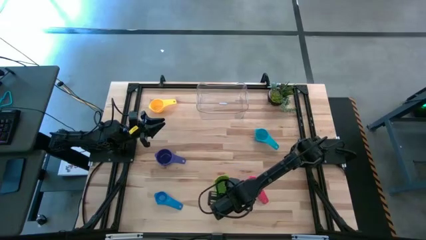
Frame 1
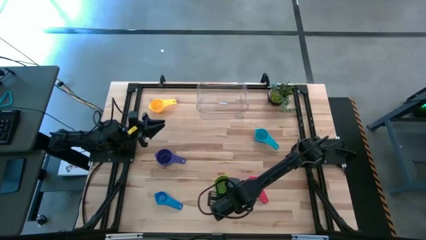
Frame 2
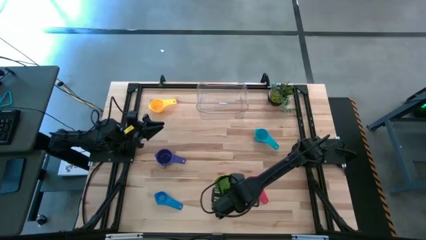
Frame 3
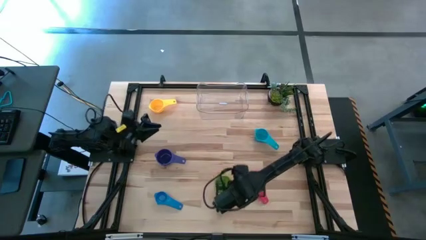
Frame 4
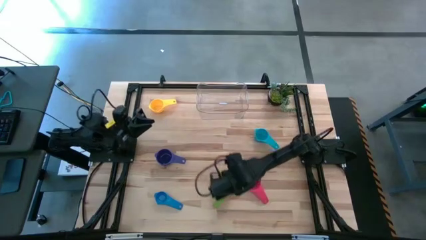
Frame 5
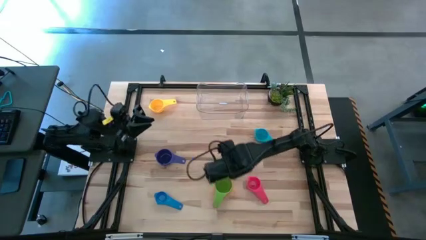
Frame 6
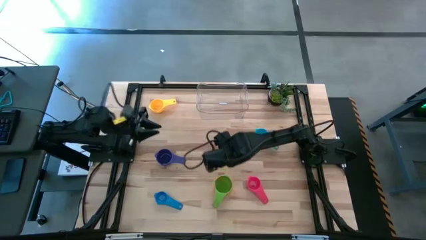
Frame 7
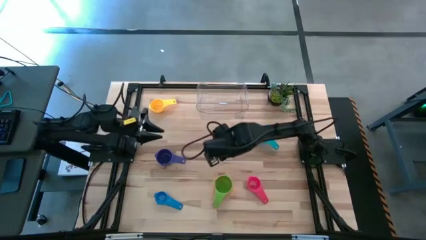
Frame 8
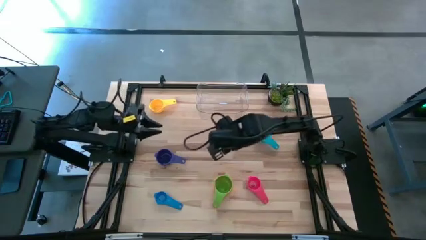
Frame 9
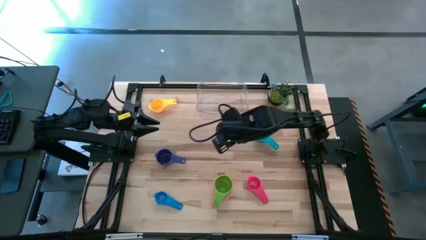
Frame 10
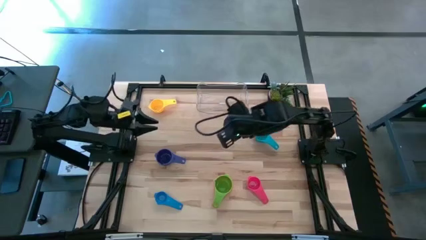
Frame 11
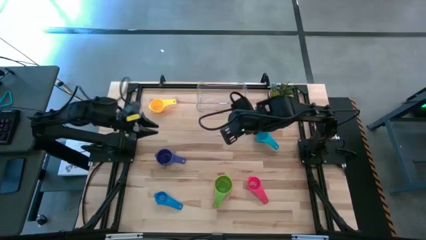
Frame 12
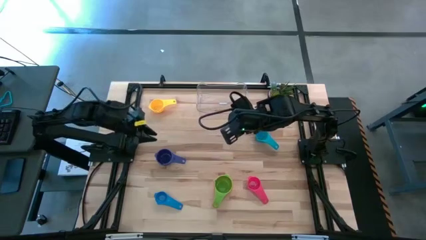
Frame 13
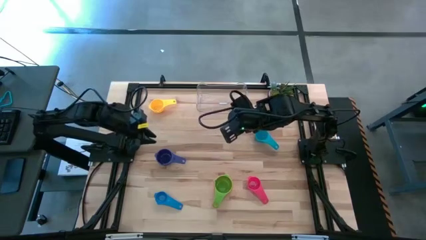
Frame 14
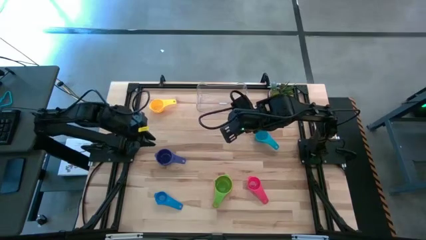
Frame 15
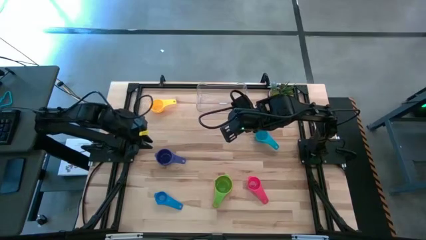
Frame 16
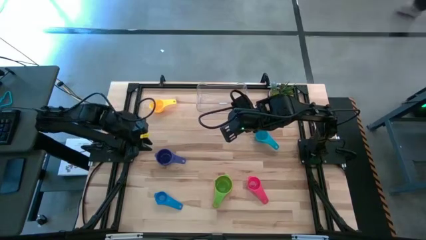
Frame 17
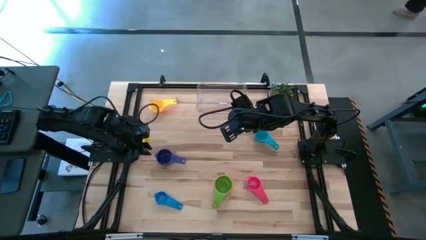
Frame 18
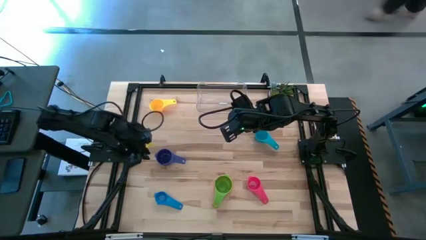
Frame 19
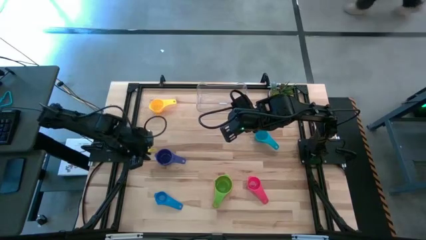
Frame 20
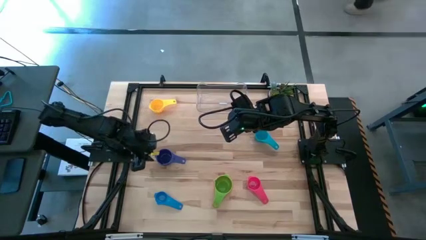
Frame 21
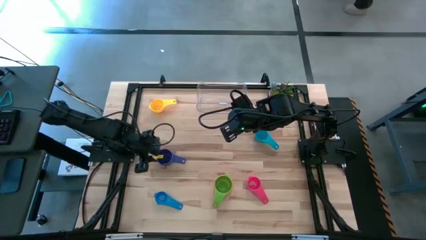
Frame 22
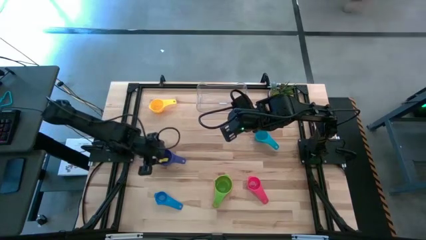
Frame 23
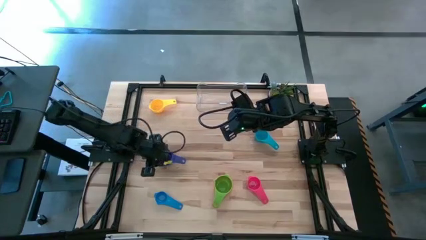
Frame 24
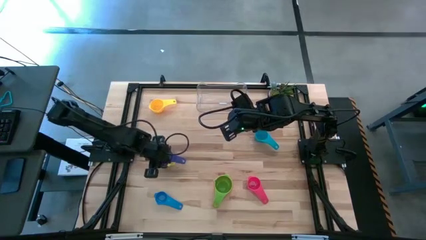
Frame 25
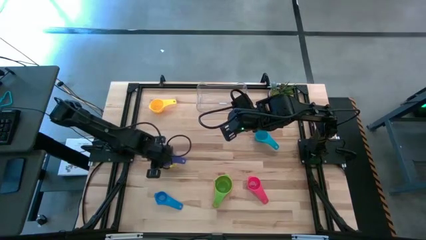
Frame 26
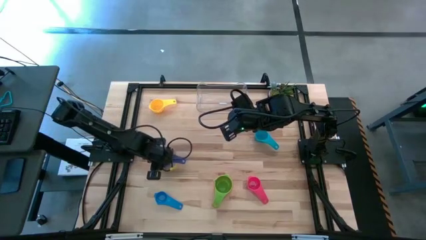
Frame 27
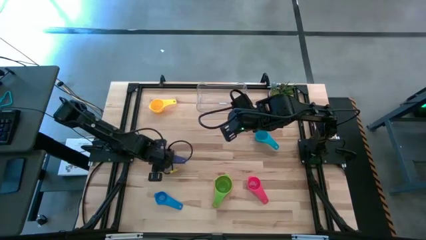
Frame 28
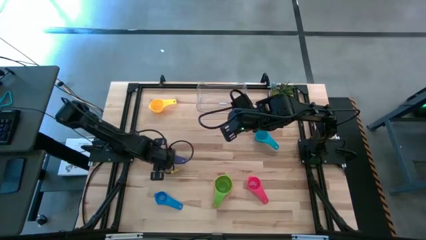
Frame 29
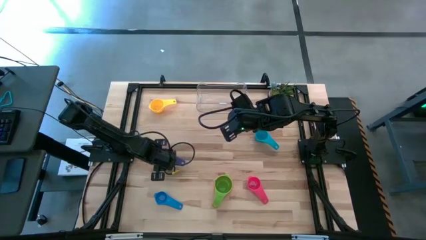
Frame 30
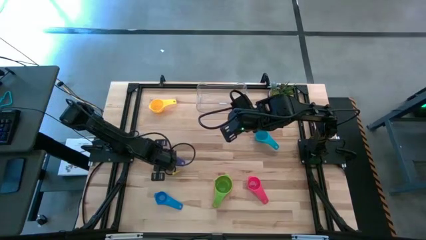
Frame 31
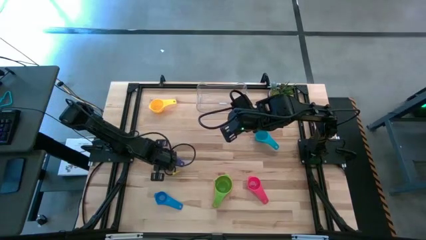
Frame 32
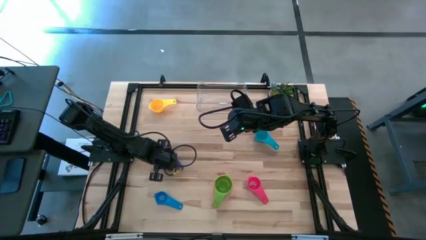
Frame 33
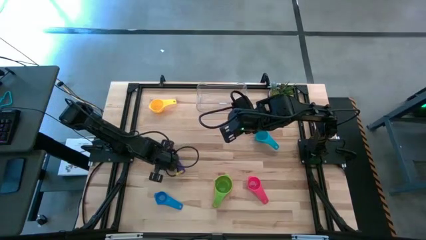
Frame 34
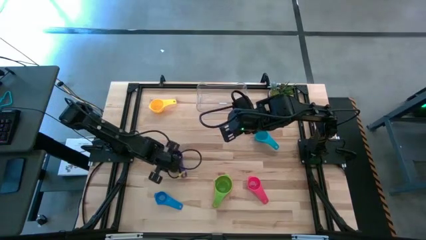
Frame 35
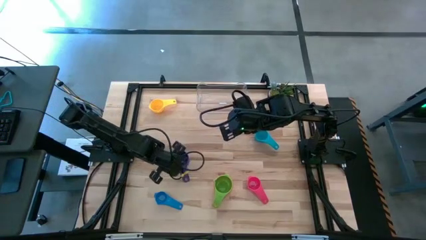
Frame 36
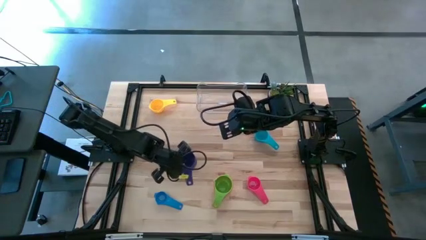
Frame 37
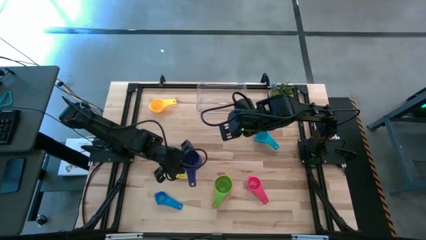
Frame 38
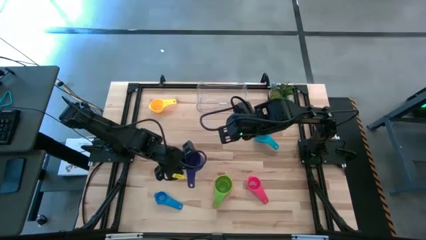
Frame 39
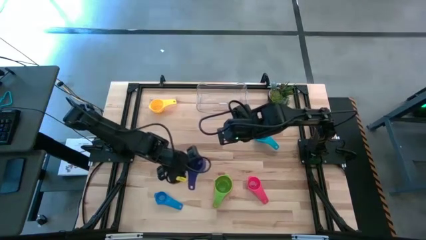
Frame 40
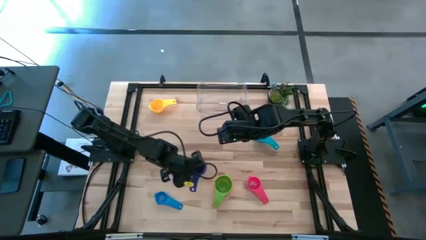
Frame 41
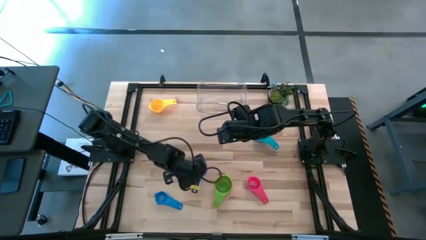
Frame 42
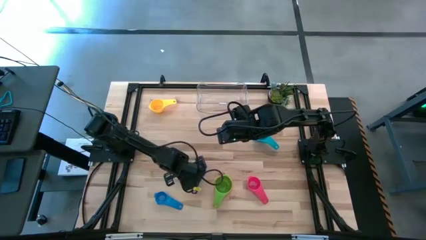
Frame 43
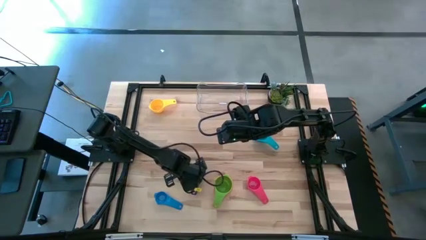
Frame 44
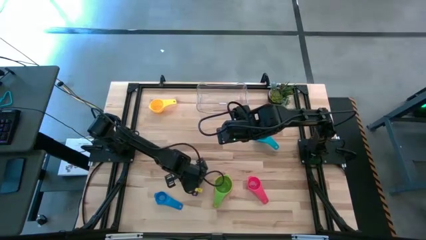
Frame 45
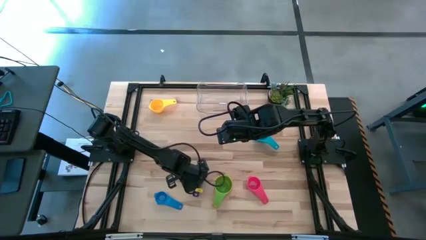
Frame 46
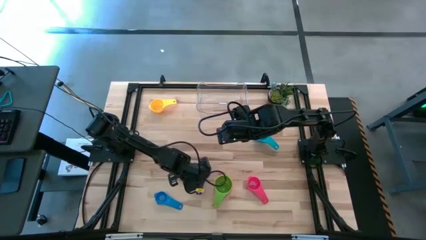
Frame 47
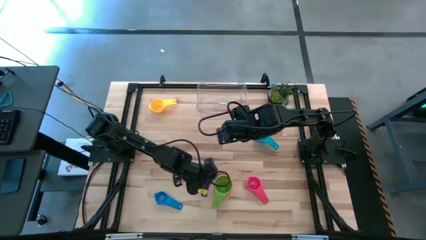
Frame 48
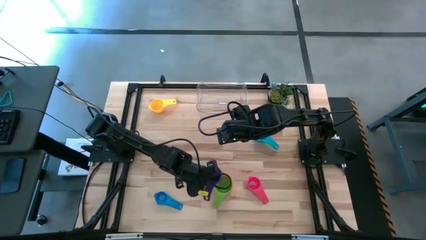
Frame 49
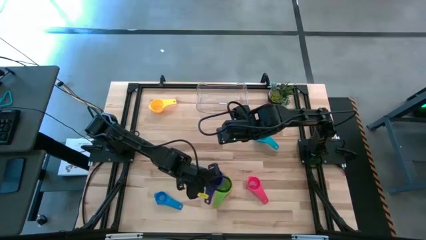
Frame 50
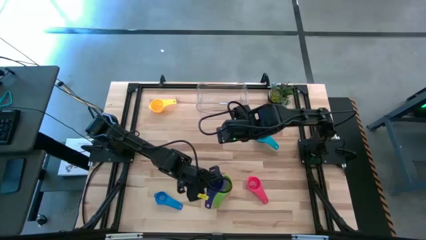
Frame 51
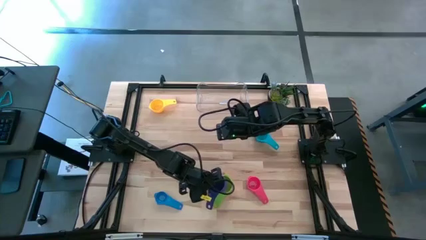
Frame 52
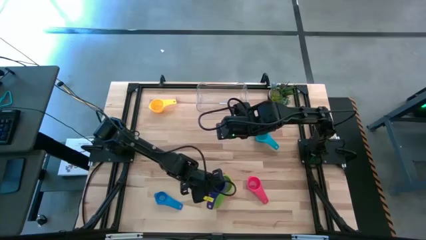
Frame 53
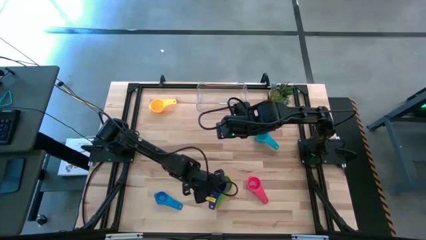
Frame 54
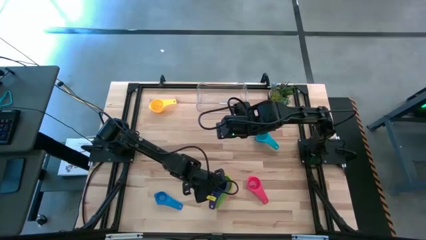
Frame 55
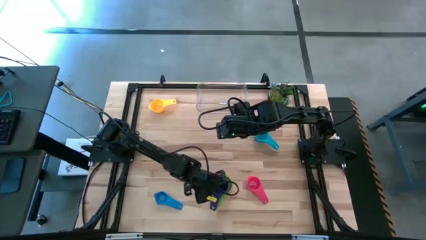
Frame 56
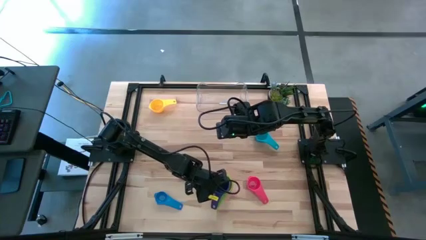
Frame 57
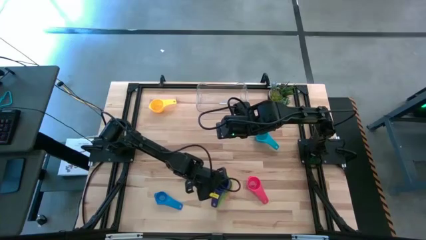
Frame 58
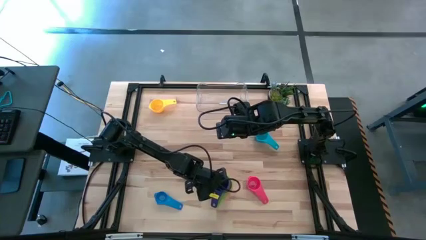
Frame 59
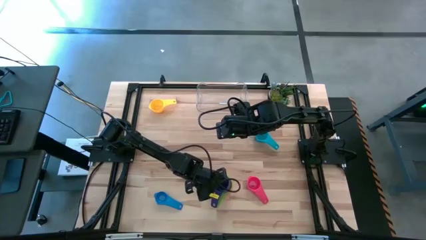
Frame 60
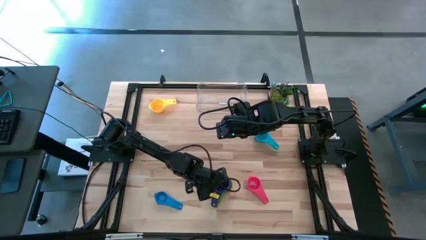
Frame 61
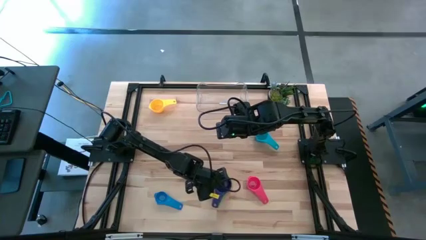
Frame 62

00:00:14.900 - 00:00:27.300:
Task: Nest measuring cups in basket
Stack the dark blue measuring cup on top of the green measuring cup
